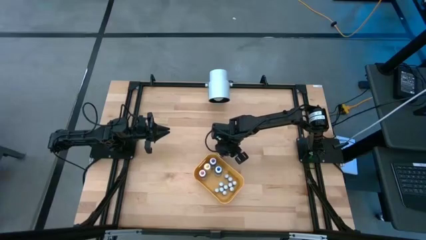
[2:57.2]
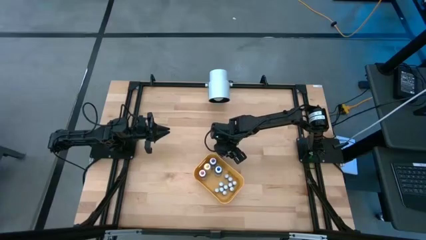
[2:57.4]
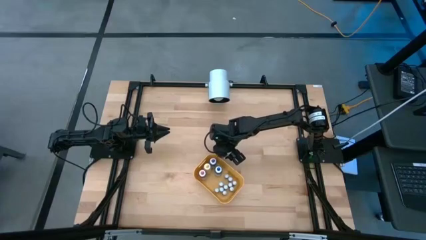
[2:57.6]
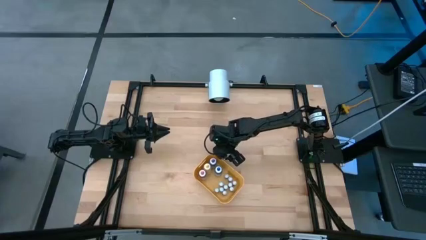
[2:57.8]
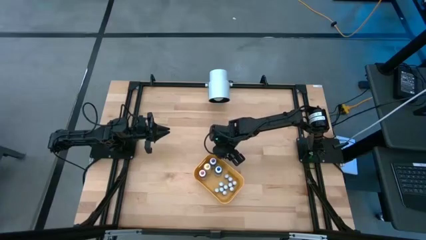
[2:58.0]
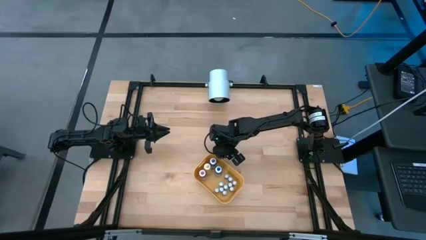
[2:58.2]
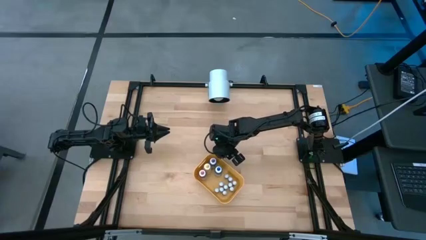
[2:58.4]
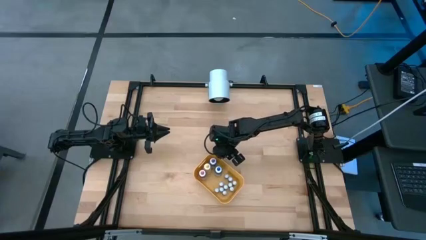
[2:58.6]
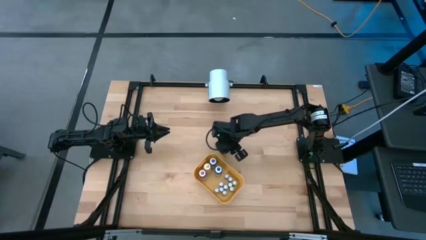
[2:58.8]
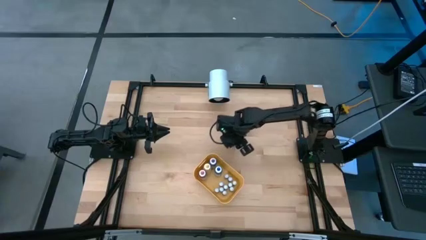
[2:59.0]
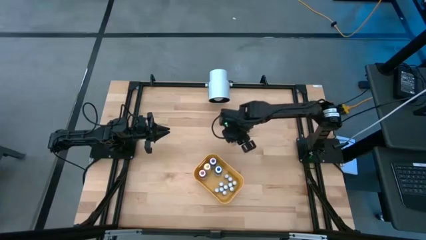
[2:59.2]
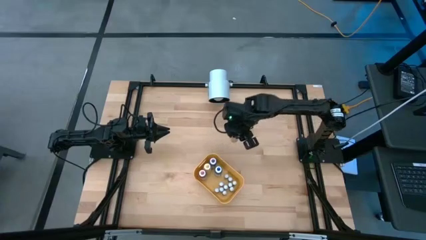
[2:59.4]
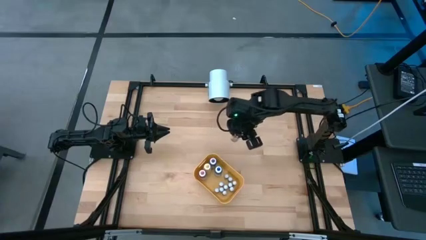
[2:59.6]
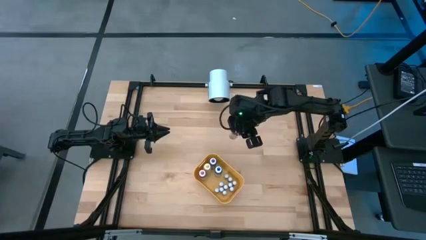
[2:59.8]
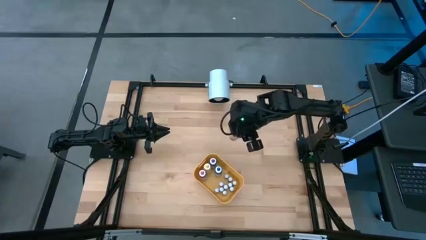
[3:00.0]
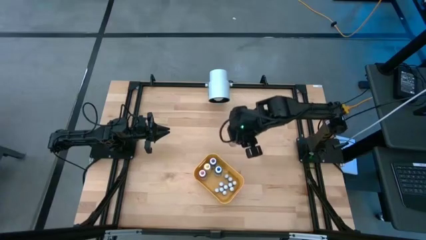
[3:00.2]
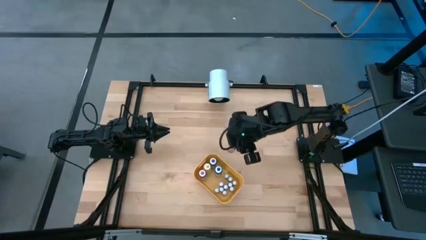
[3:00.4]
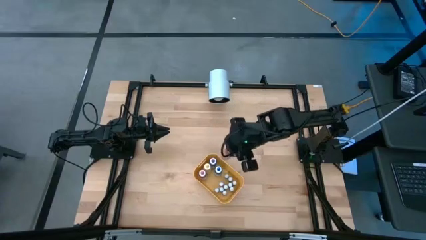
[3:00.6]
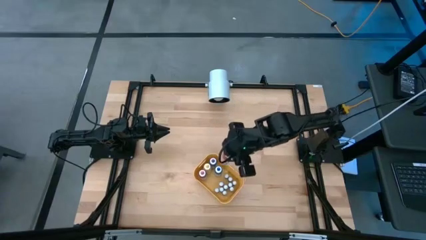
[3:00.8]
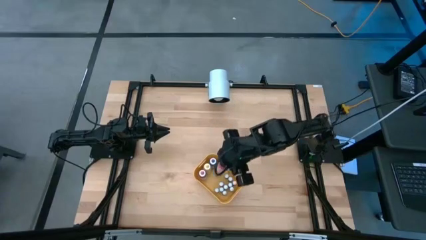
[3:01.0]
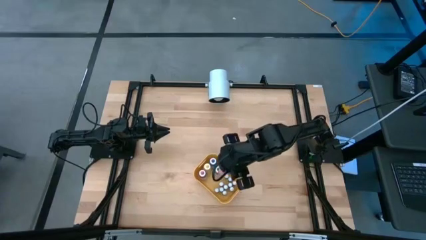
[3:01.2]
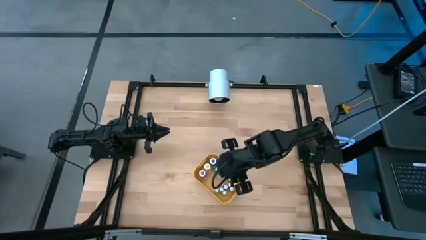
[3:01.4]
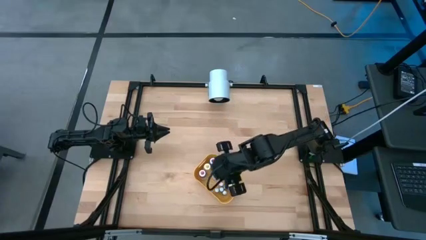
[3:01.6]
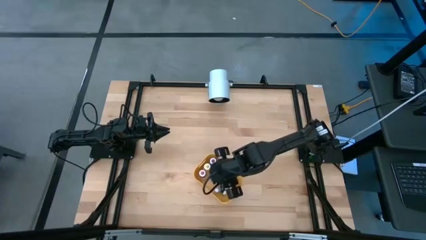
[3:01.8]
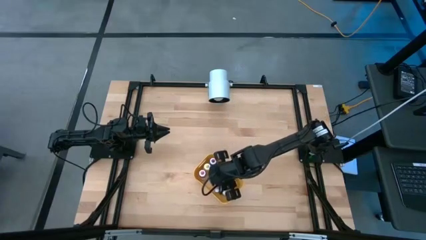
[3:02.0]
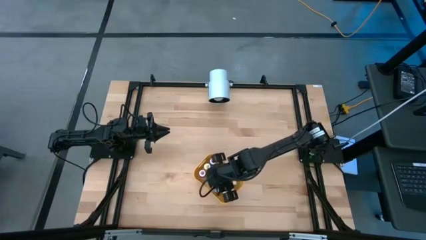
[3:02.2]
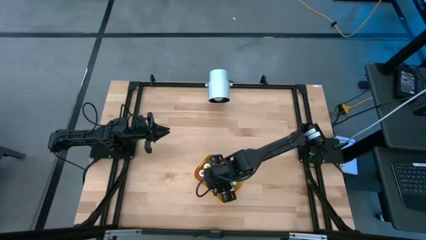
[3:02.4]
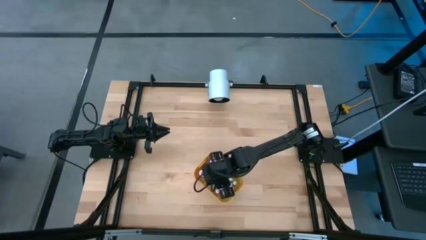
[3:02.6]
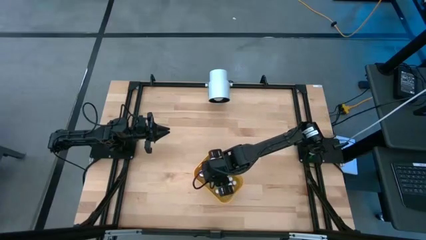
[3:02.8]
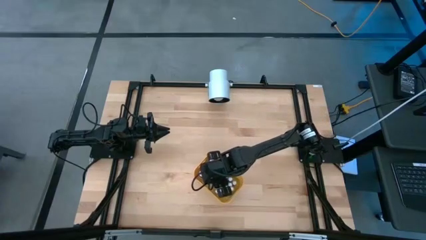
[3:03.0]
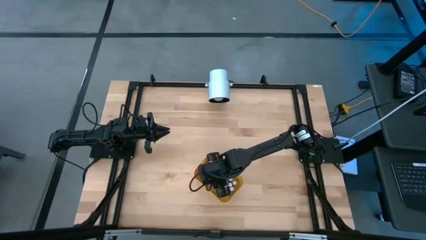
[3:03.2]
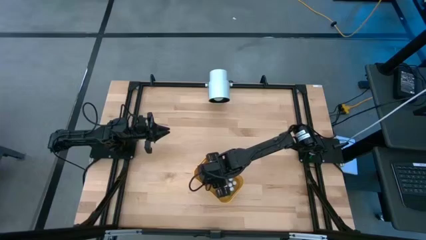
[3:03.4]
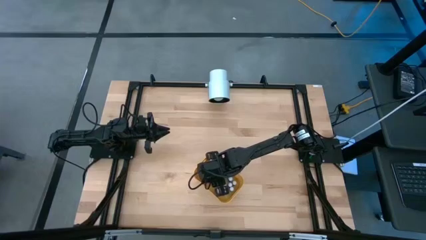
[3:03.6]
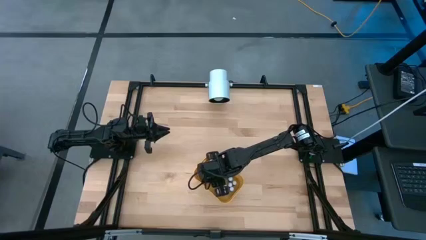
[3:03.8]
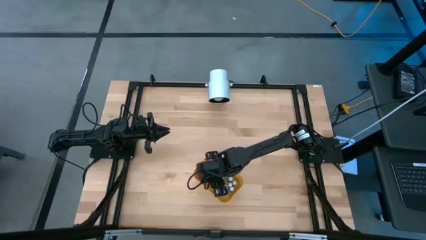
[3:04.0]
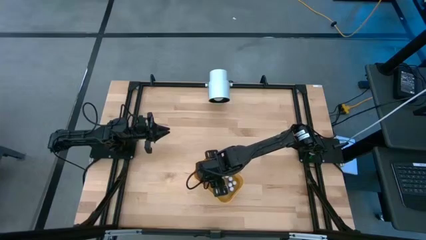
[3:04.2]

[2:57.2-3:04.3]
Task: Pick & Place food coloring
Put the large orange food coloring bottle into the yellow container

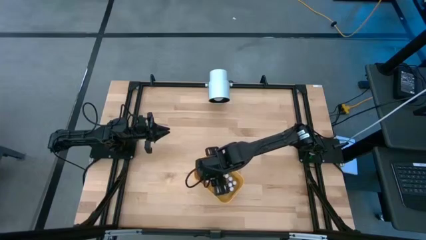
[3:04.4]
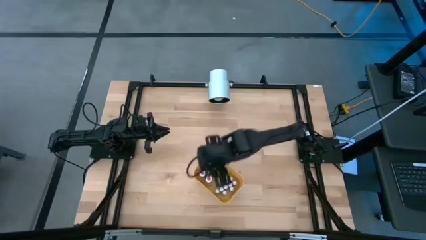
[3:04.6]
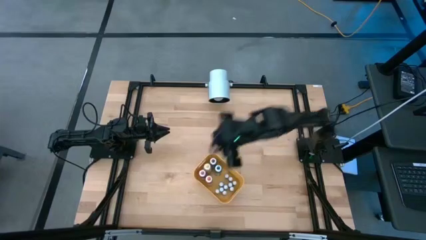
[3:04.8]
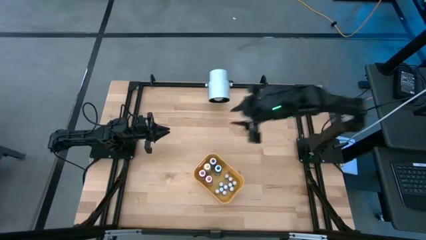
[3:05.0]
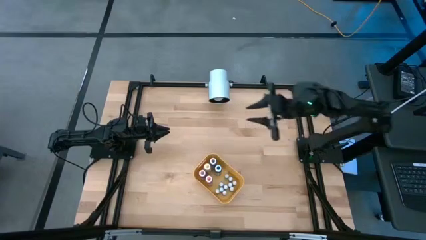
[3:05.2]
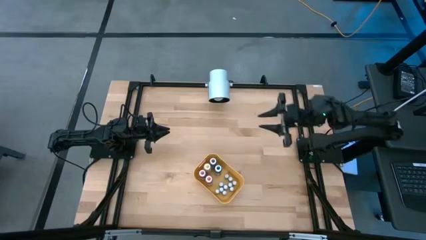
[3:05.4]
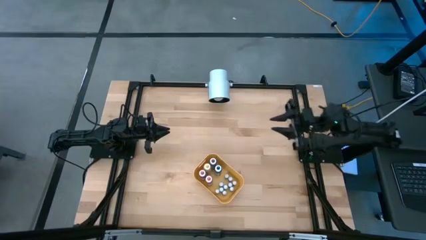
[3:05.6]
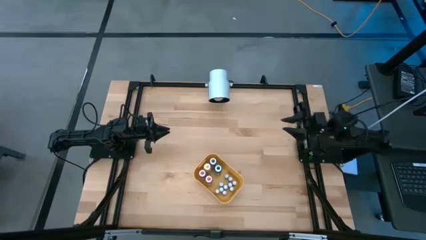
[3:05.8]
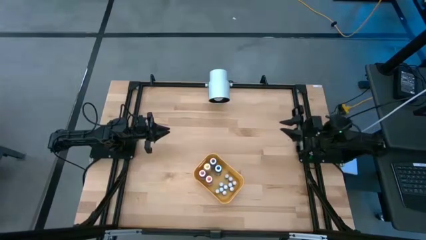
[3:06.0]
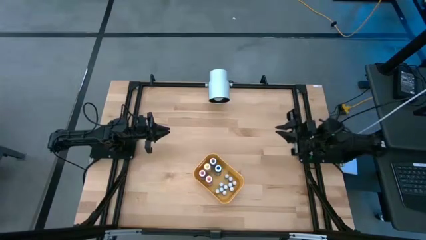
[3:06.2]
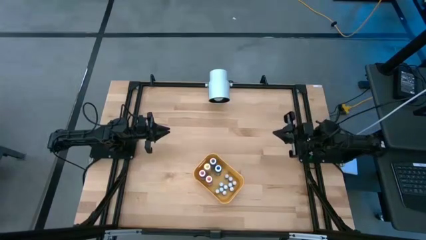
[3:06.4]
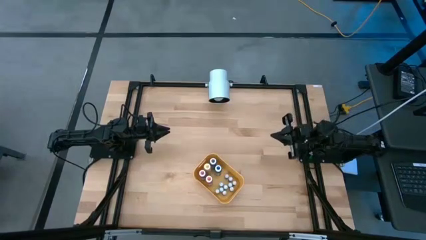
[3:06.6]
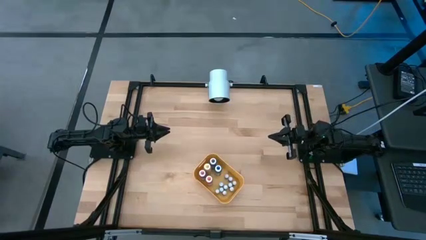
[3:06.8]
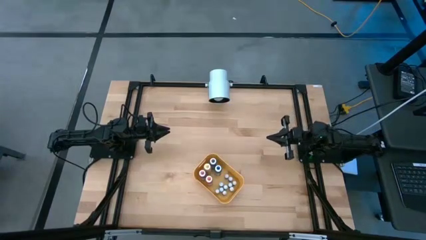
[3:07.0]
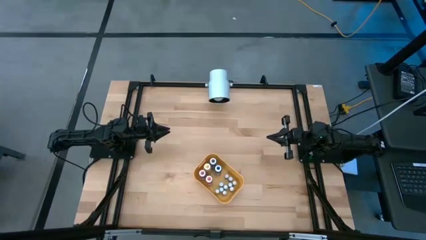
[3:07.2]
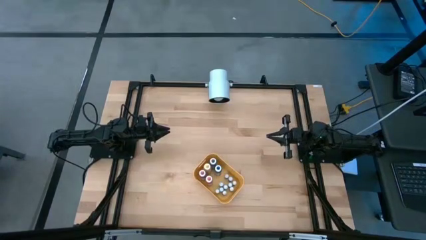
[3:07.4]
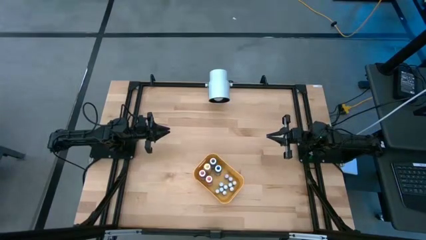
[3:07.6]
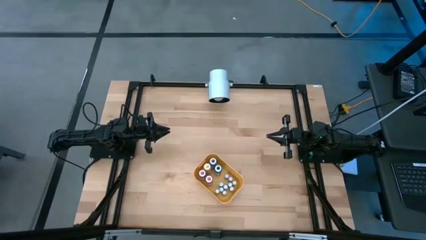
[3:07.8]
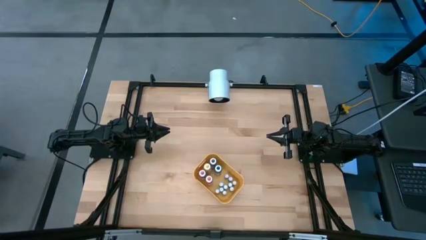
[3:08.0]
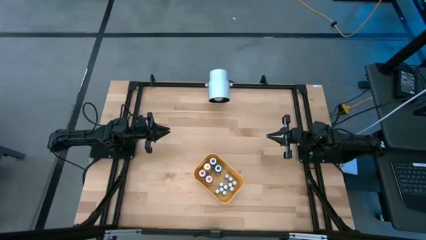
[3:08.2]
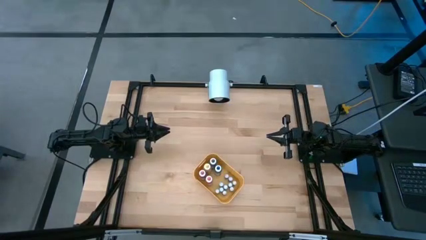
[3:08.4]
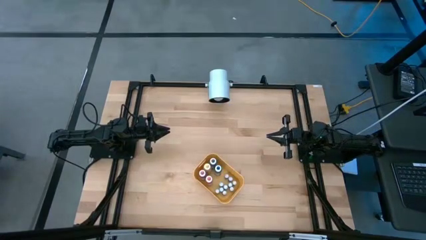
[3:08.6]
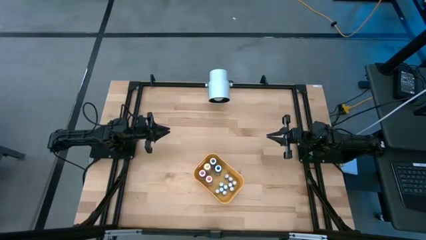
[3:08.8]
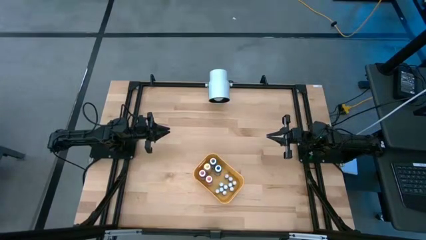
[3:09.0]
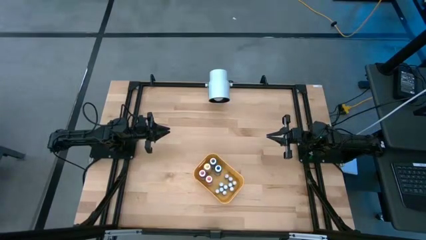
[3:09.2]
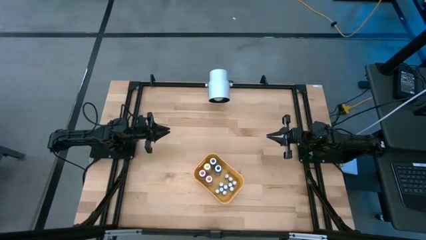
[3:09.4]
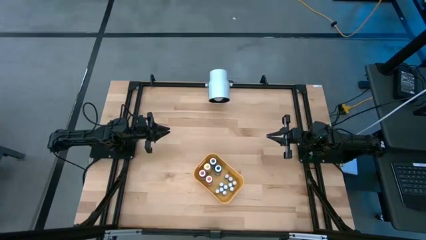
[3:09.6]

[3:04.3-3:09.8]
Return to Home Position
